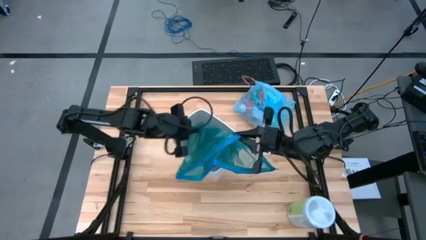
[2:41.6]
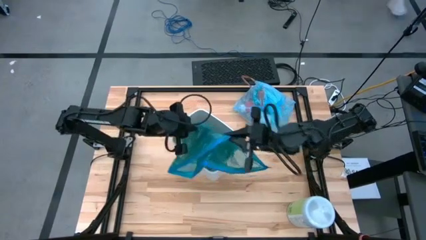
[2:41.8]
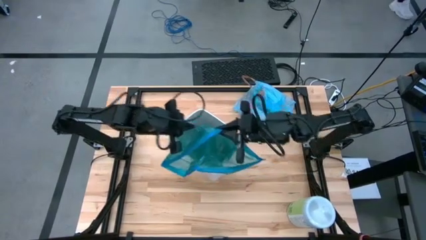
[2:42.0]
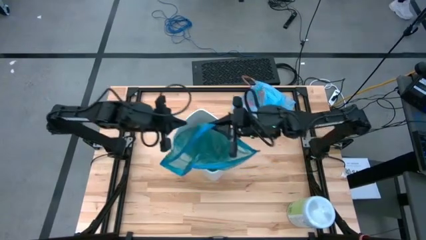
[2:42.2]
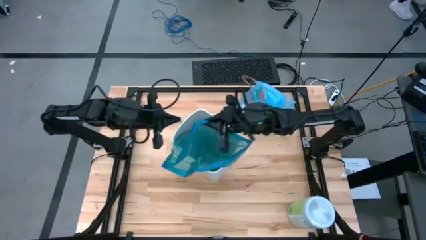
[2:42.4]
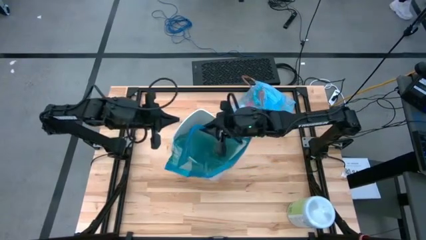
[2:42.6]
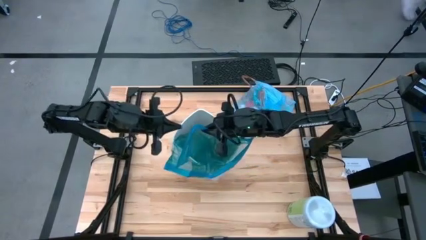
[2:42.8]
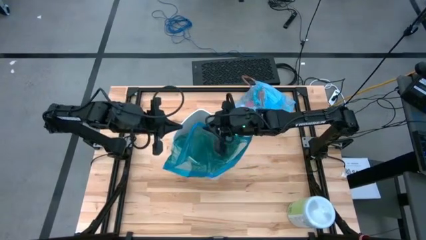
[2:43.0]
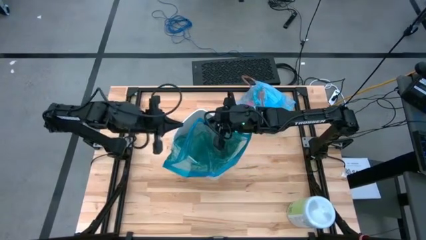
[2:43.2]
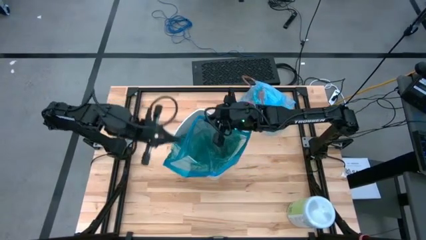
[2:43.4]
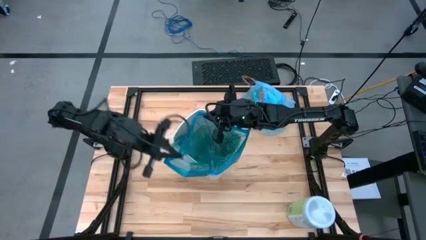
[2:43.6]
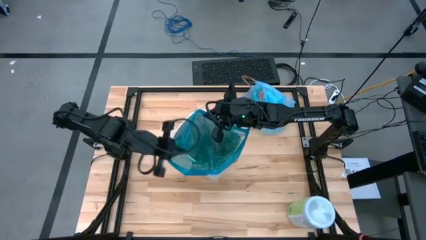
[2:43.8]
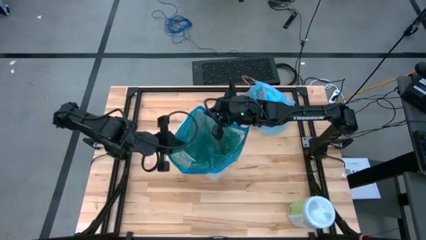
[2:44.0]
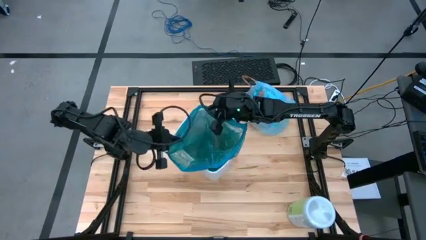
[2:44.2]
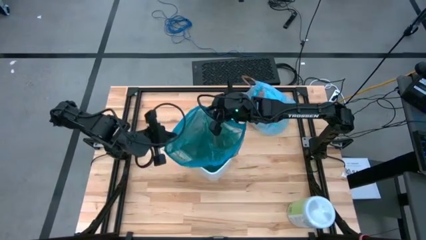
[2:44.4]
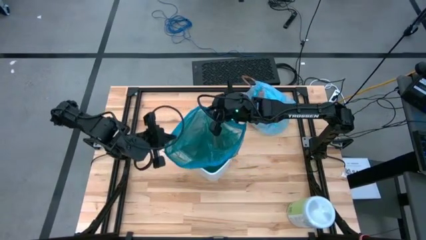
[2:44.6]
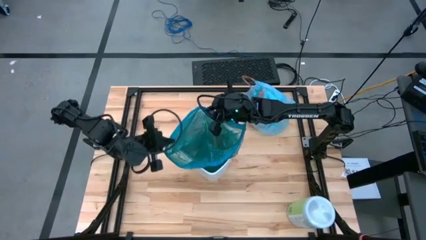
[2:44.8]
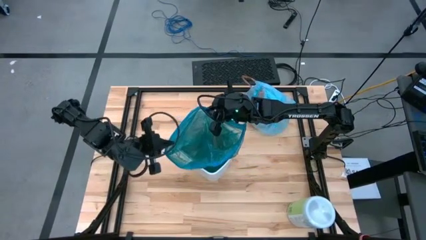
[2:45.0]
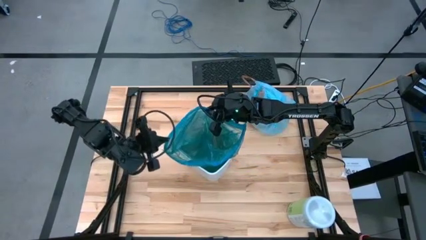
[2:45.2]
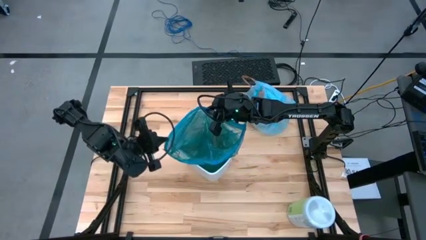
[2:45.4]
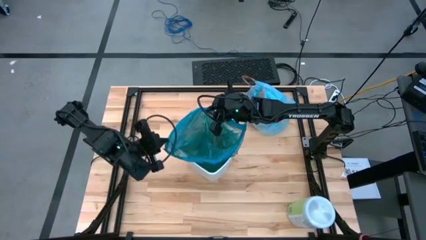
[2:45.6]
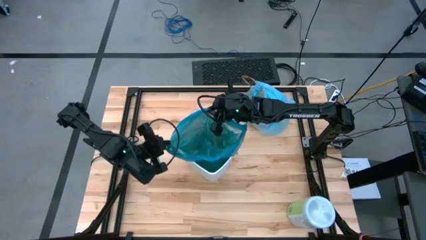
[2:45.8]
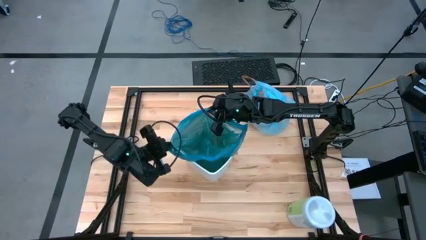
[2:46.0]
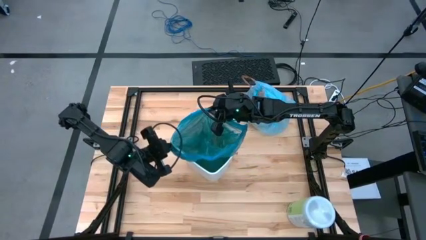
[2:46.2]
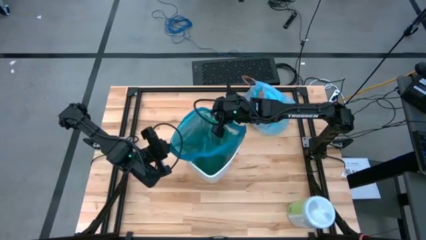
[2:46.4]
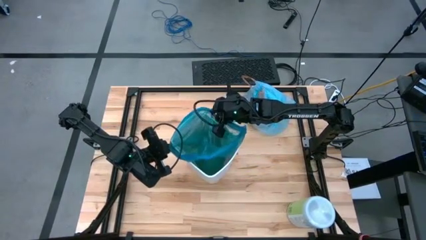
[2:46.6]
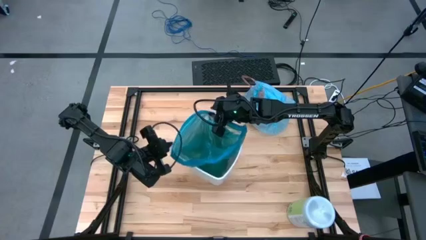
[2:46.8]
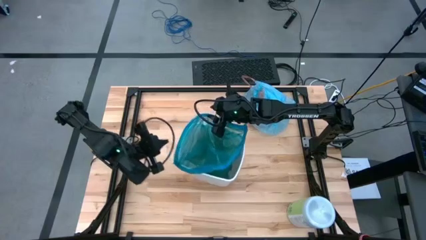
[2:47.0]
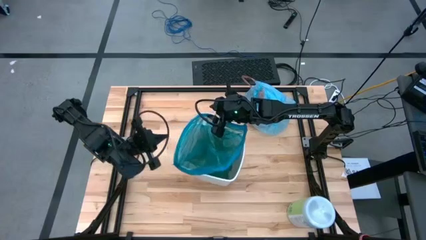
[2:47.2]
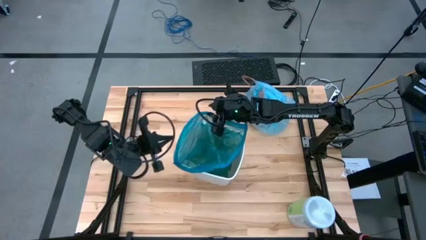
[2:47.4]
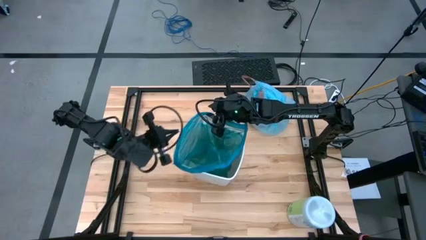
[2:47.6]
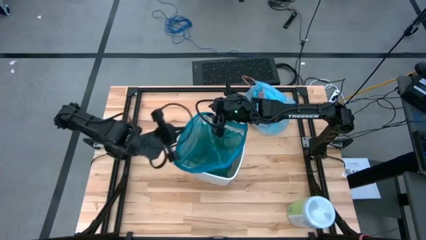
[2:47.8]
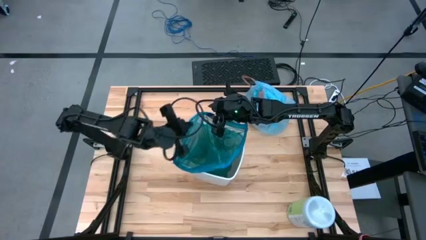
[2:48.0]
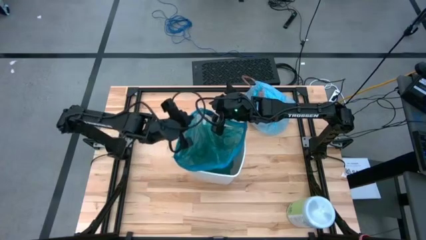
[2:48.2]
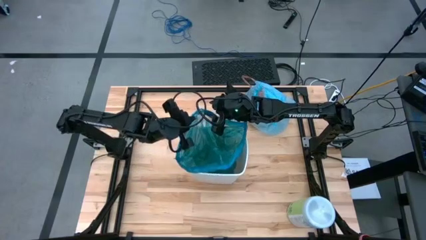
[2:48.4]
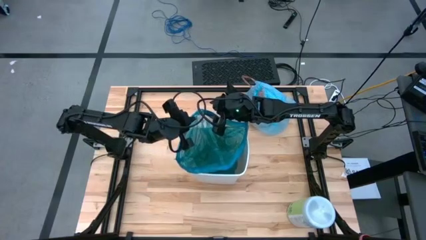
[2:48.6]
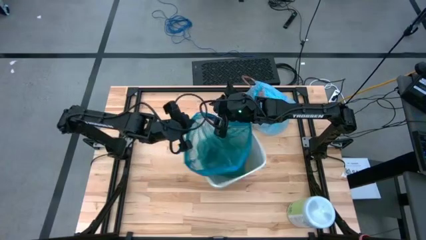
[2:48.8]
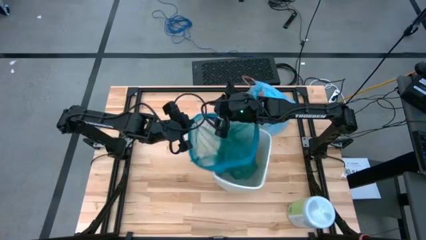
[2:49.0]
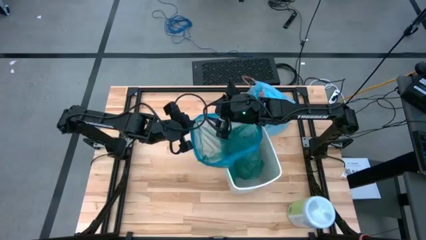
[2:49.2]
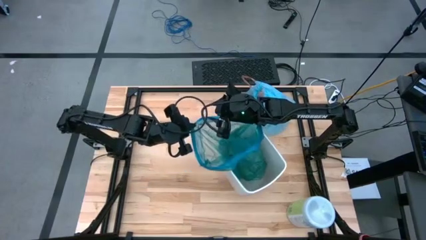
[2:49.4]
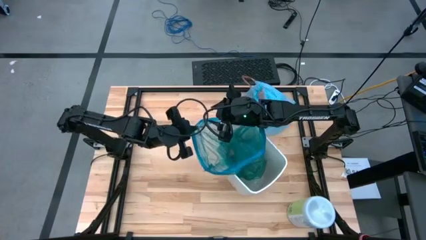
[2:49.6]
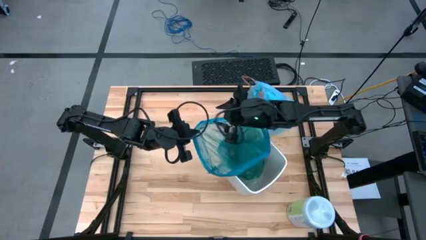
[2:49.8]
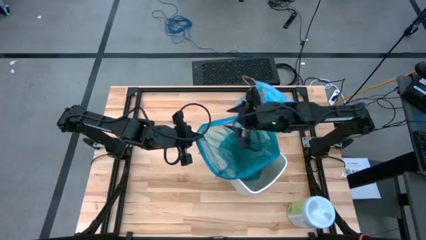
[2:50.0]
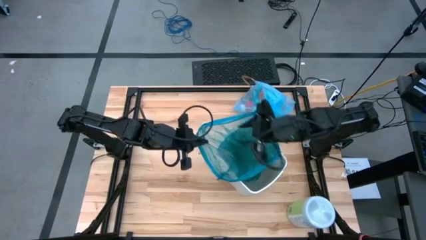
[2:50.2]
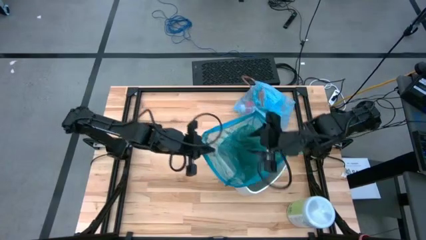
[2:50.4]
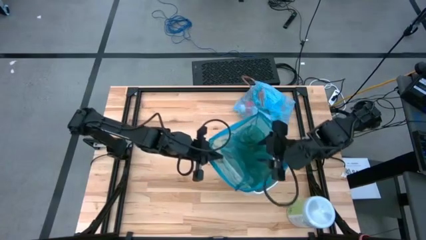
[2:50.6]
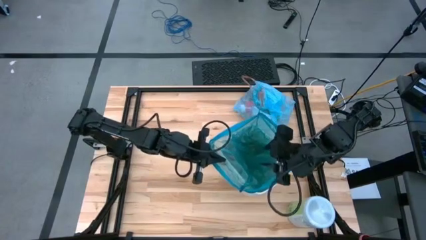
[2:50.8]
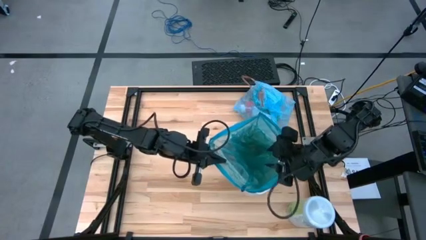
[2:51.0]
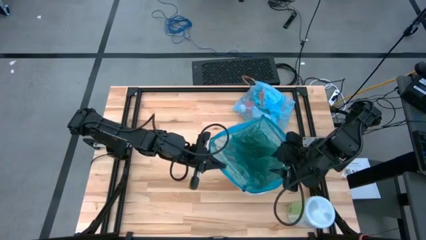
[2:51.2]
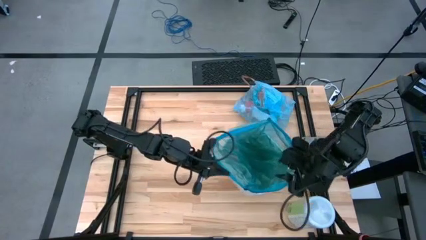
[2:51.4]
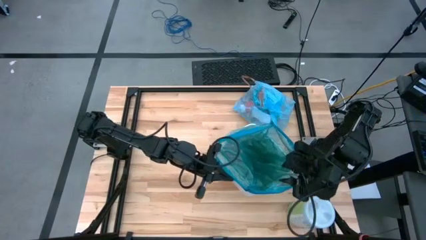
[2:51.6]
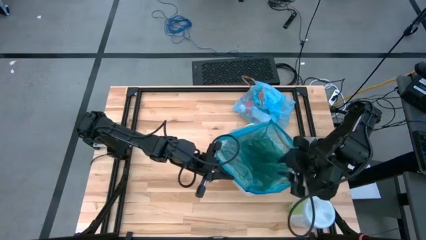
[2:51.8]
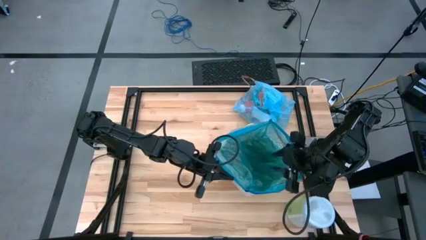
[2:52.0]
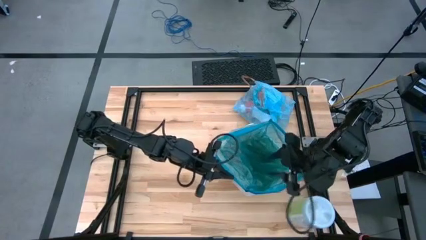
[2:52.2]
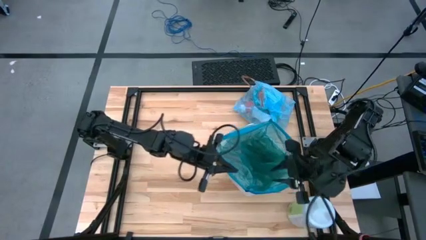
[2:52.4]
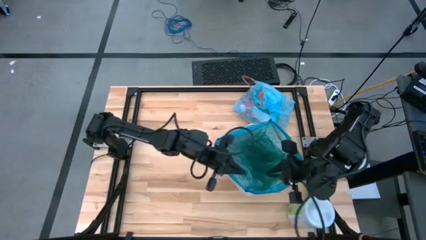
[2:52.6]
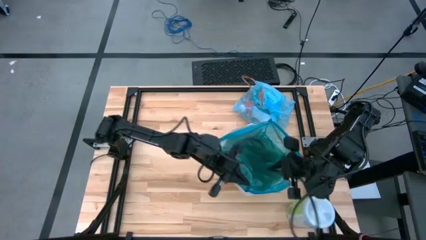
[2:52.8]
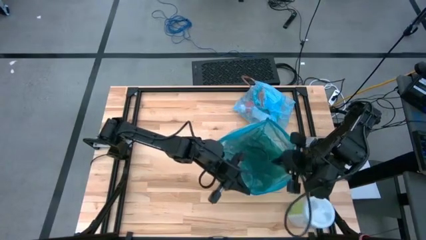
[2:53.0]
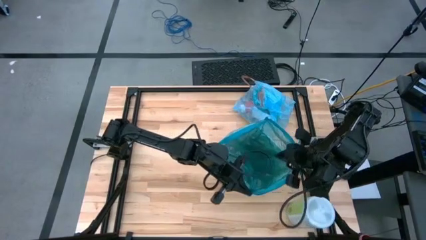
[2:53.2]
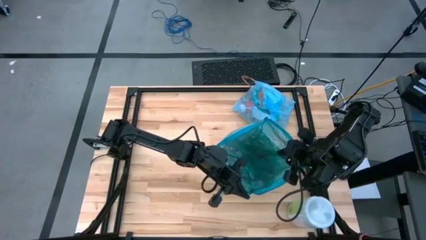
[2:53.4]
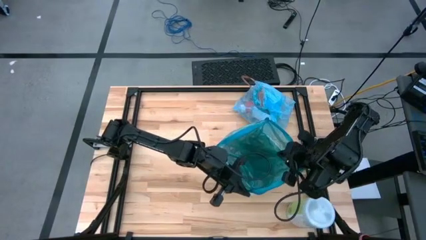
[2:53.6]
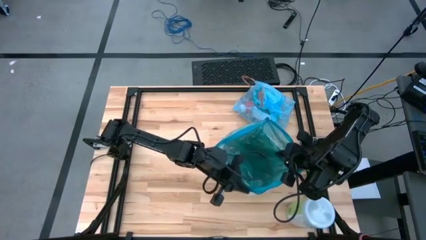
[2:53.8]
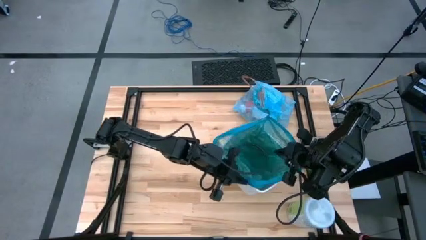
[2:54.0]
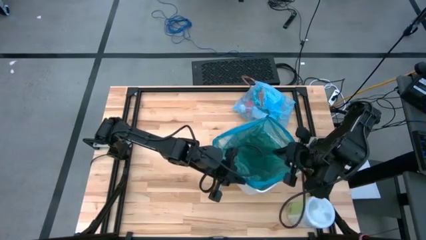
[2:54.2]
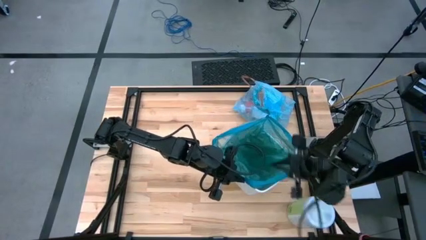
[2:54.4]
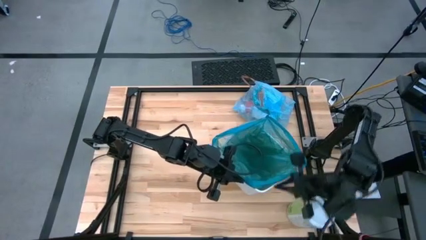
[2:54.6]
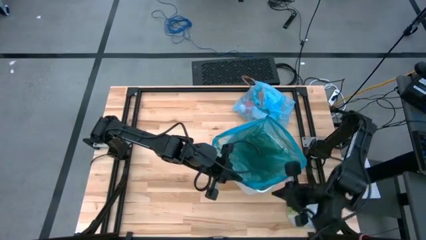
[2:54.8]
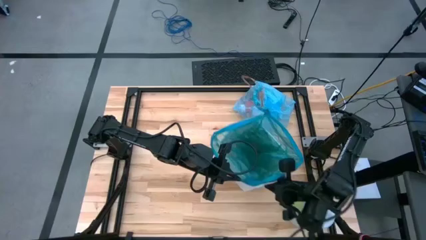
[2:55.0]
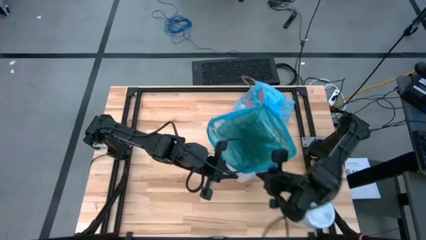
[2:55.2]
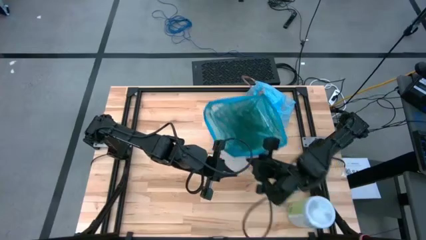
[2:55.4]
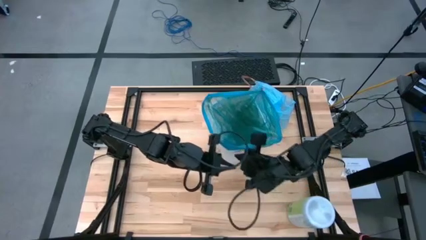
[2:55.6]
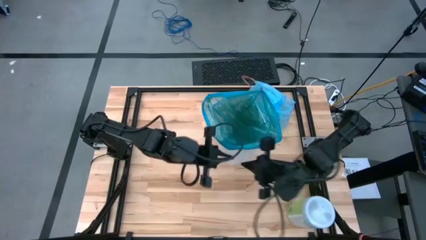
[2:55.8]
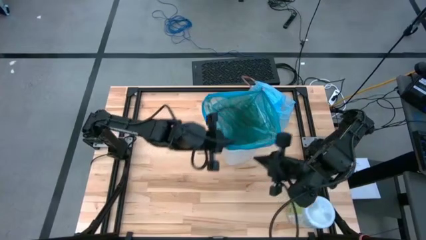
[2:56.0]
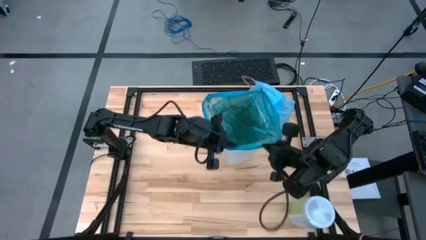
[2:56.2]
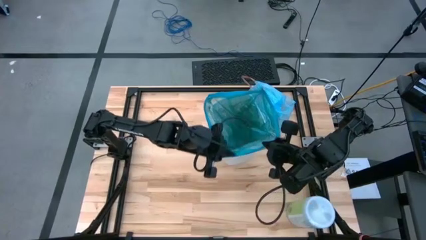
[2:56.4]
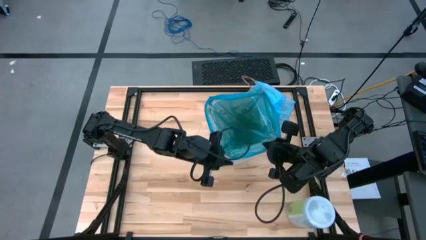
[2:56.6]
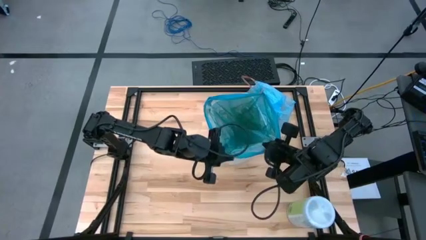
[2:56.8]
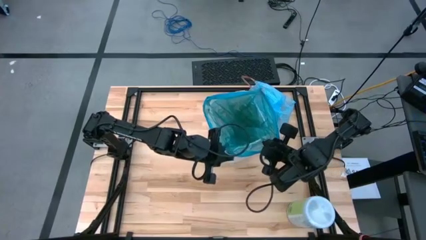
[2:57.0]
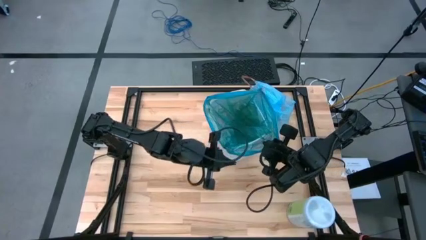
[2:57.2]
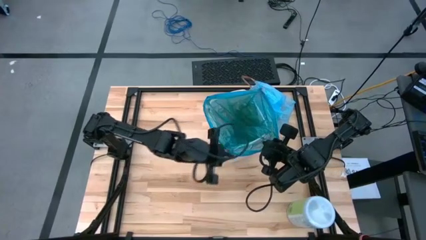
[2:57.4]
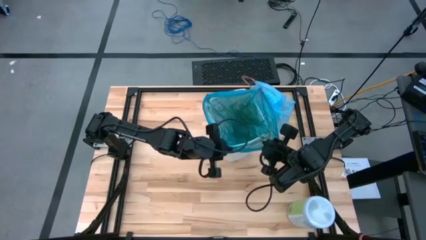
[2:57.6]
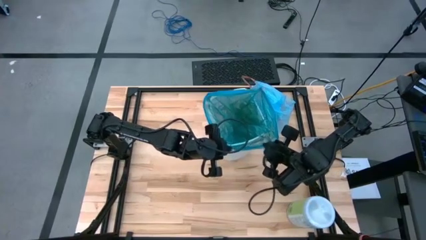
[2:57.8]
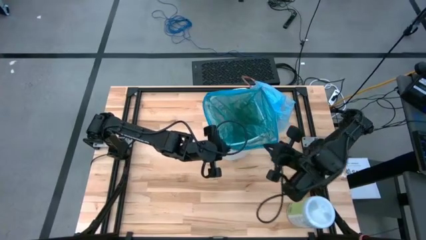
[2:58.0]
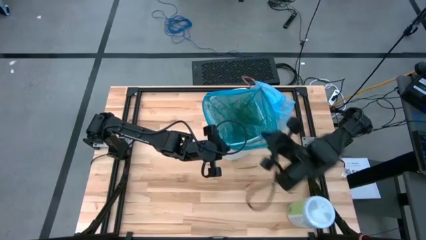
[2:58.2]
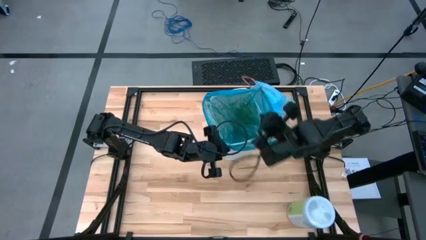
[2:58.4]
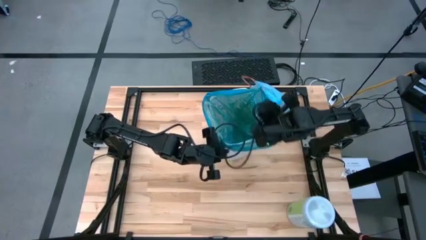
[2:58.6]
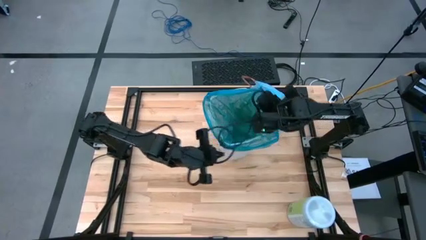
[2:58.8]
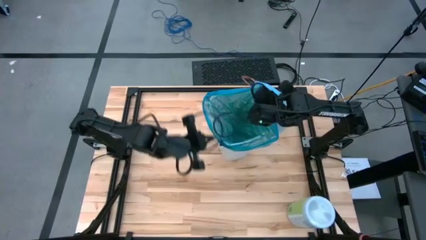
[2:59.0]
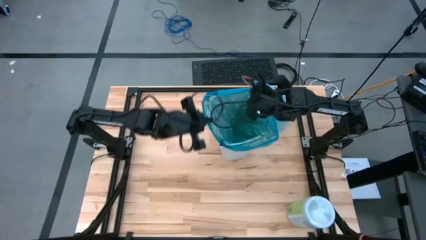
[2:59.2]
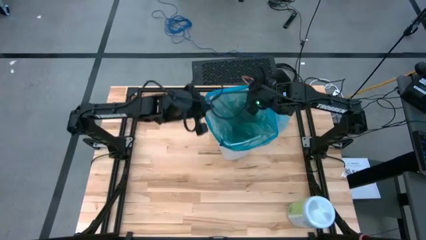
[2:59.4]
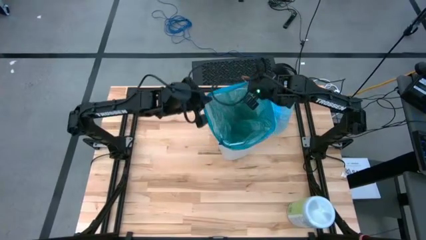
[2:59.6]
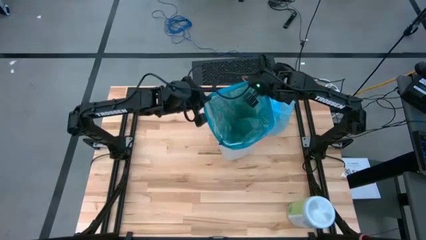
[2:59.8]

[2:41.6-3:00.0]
Task: place trash/remove bag and relplace
Insert a blue trash bag into the trash bin
